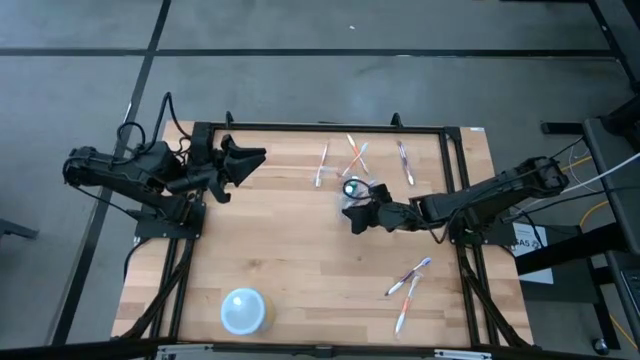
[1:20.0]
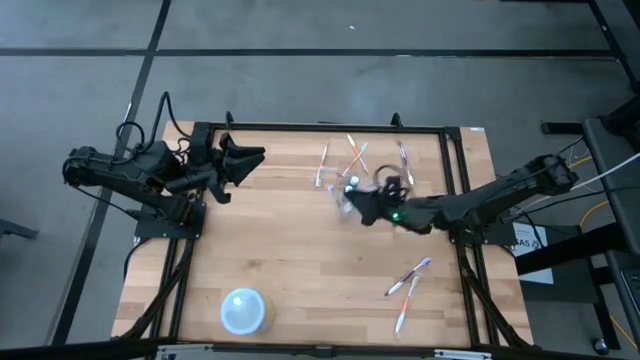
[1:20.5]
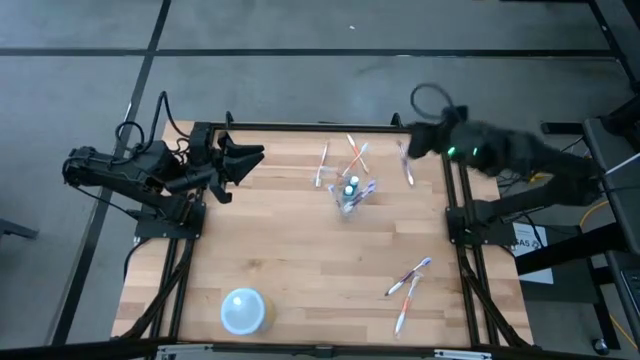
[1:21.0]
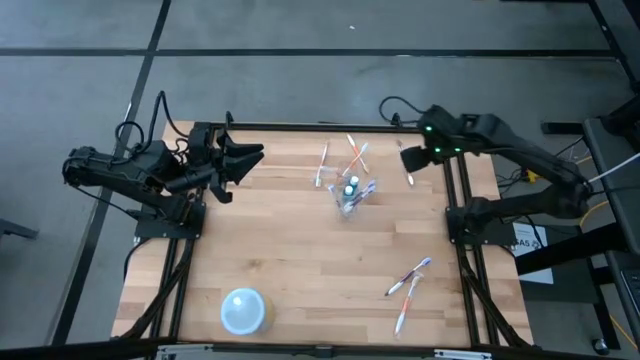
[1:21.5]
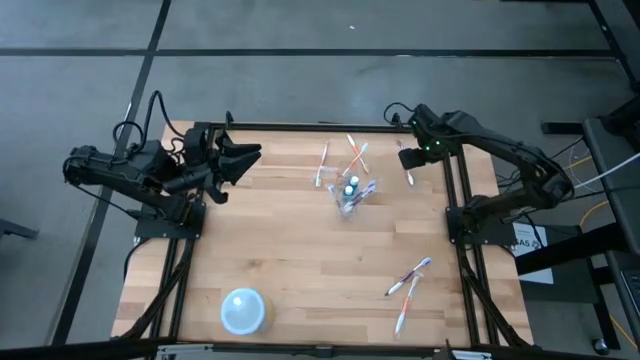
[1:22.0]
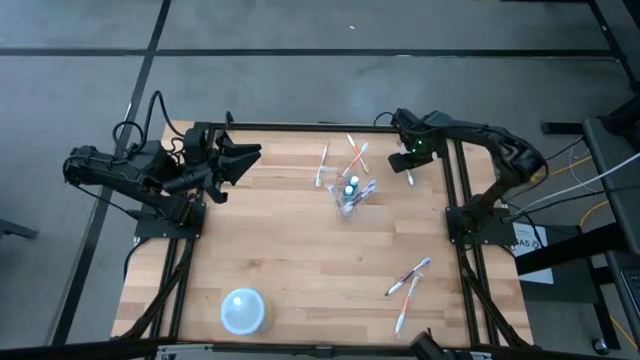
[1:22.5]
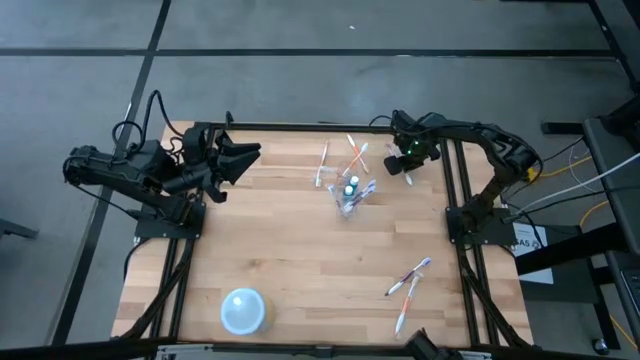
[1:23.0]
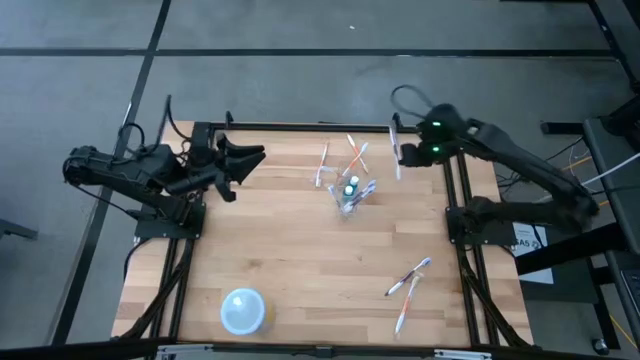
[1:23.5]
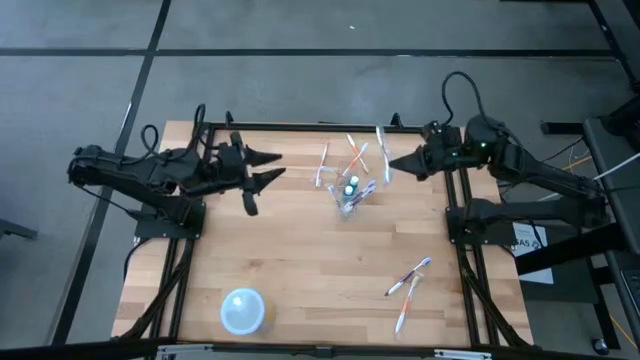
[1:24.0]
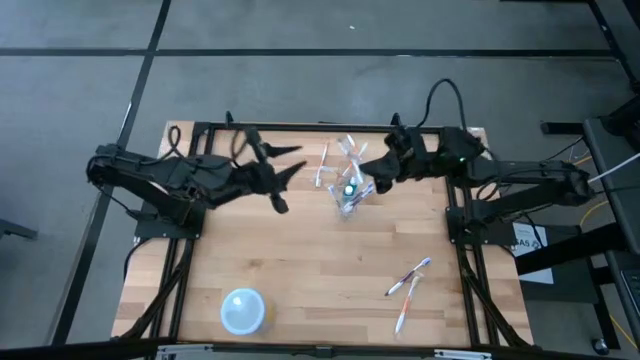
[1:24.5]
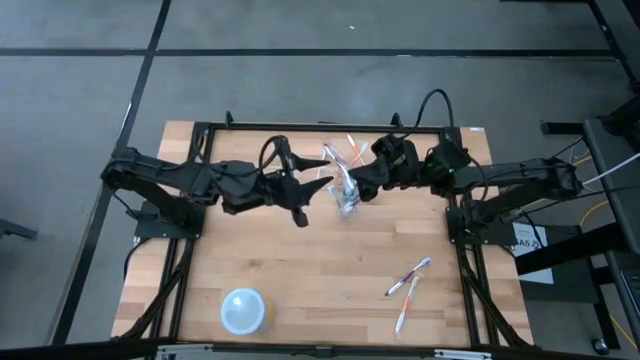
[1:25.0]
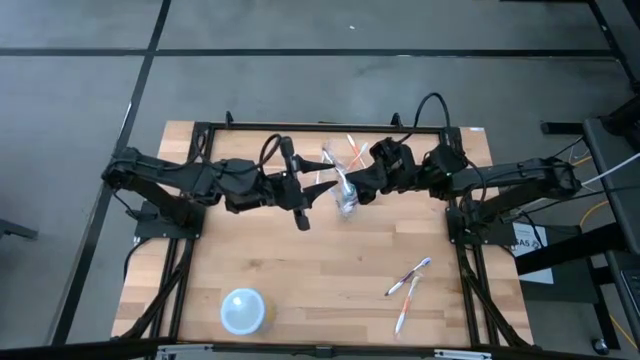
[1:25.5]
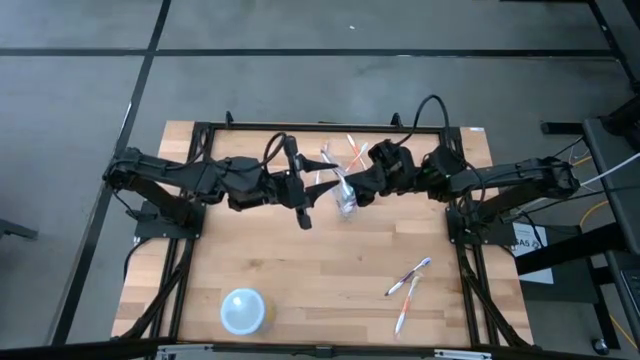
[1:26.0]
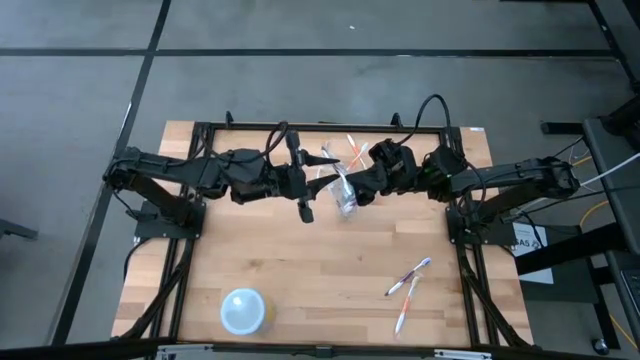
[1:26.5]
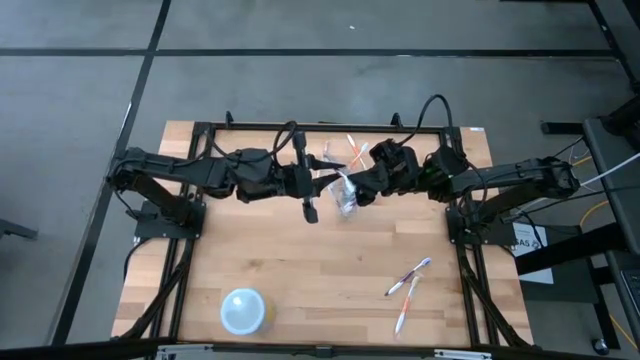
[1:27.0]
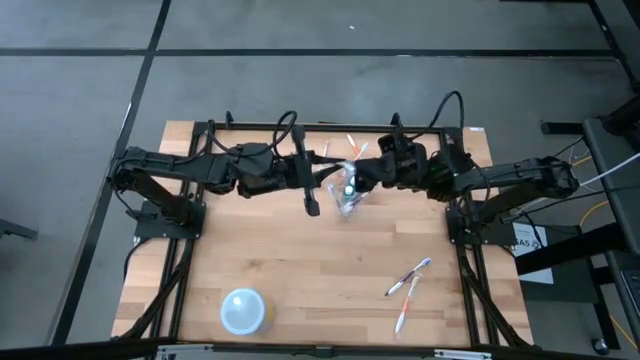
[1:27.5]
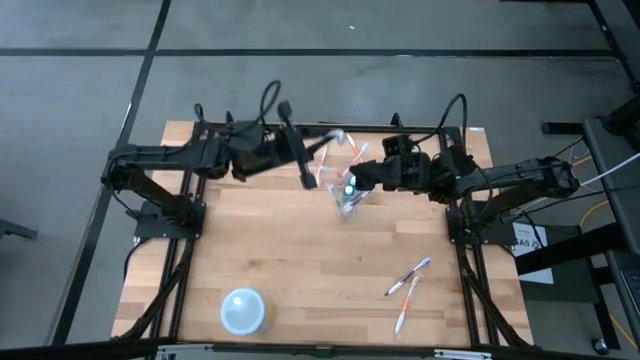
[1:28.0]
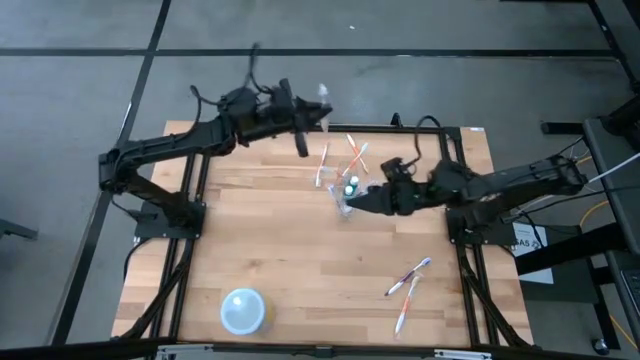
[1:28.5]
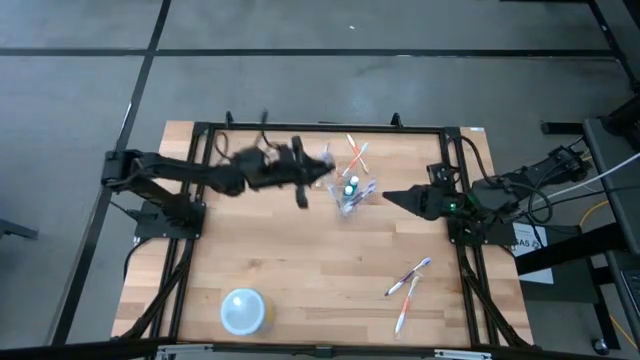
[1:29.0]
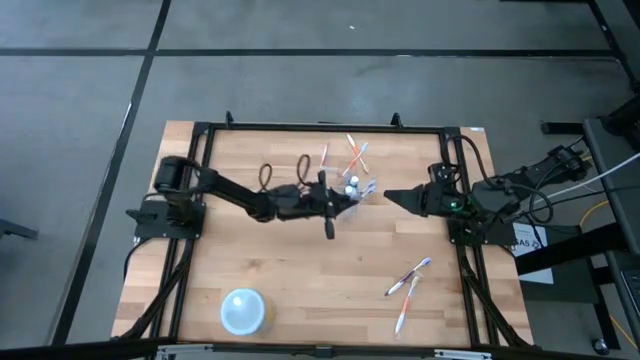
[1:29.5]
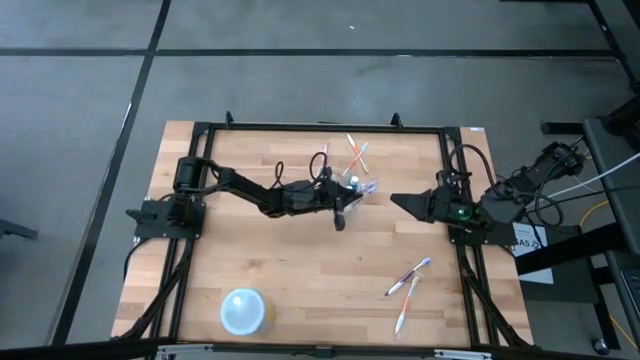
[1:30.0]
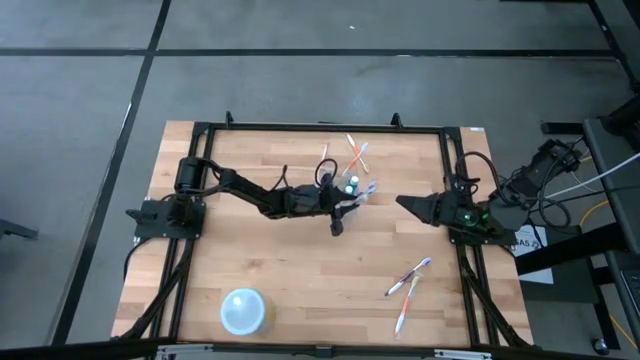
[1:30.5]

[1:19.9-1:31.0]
Task: Pick & Place toothbrushing station
Put the purple toothbrush into the transparent organizer

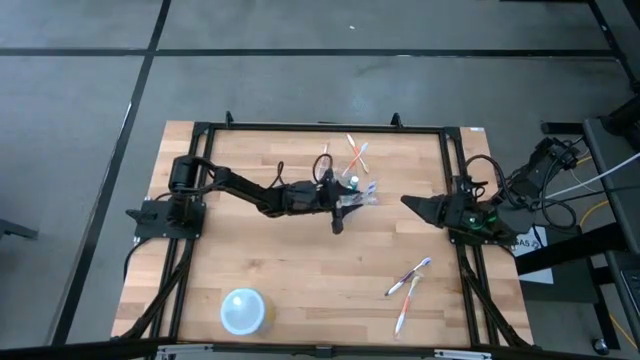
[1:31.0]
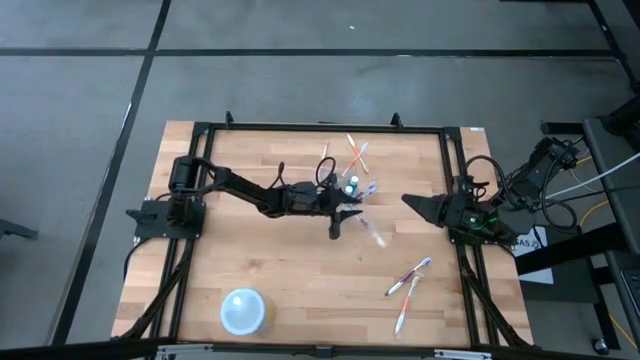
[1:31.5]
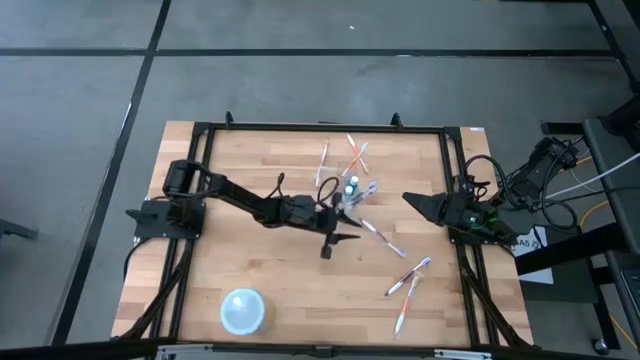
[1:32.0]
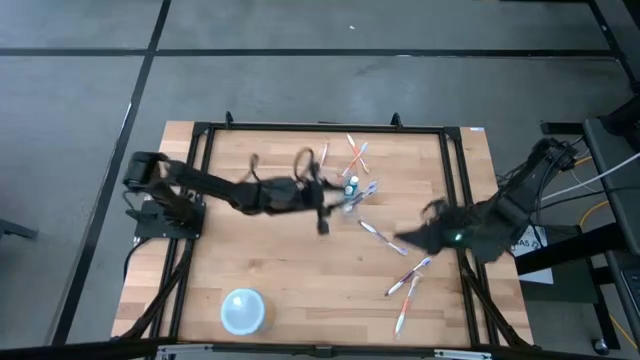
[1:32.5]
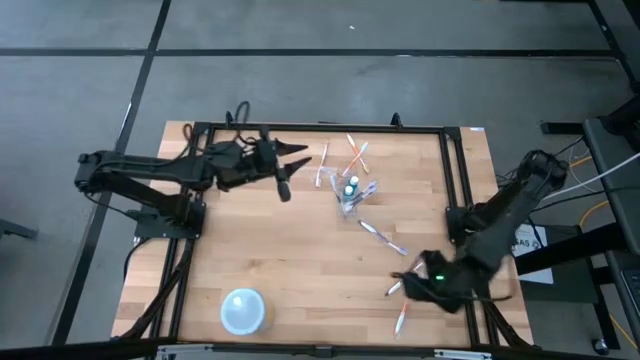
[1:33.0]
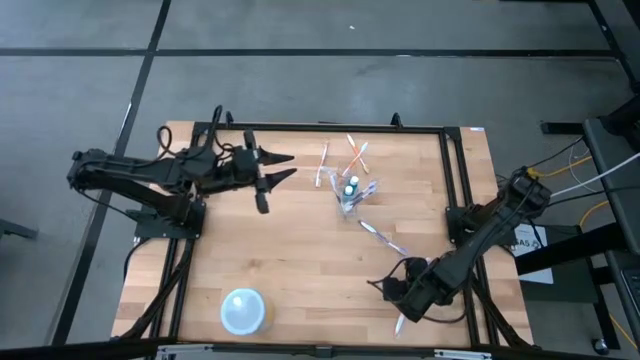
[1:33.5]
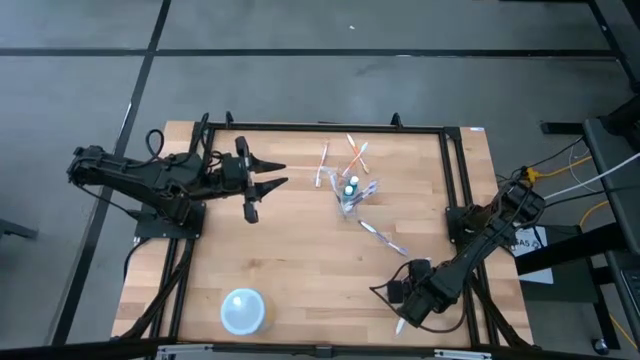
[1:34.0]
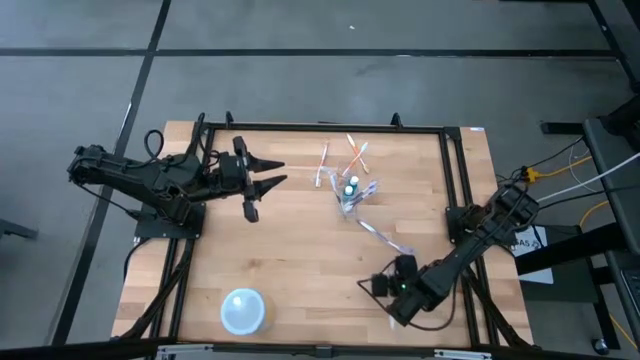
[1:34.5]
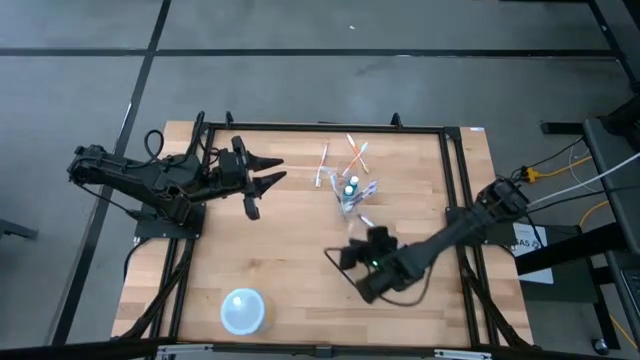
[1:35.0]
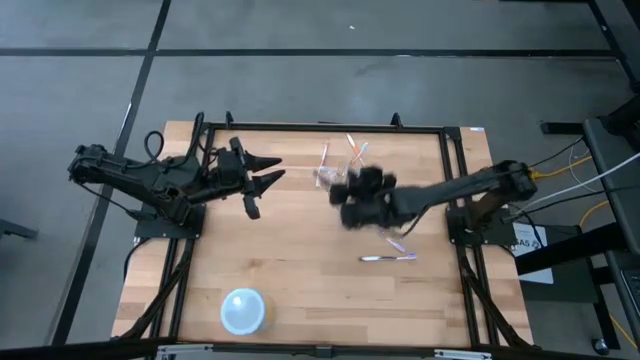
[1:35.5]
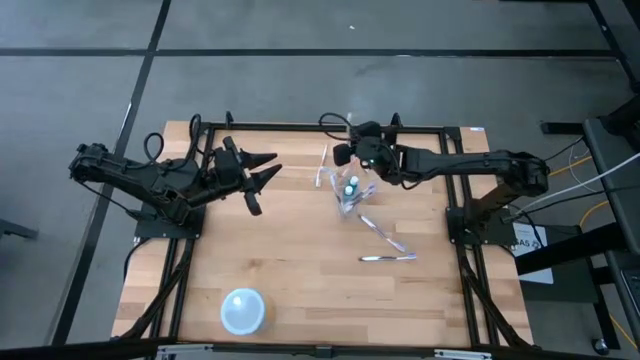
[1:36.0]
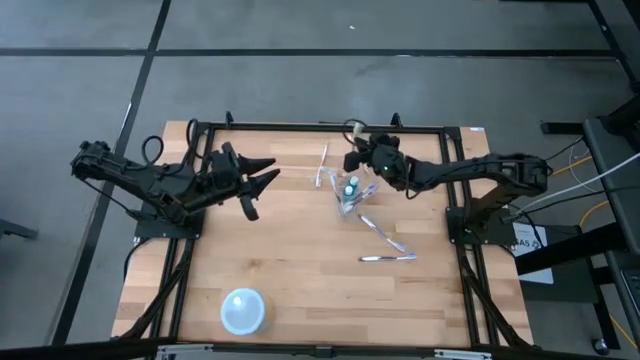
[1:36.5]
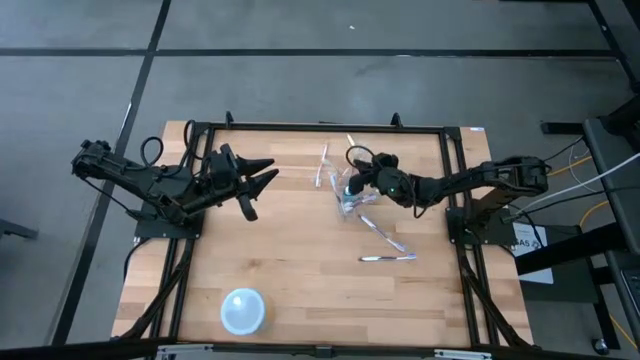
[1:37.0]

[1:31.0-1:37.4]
Put the orange toothbrush into the transparent organizer

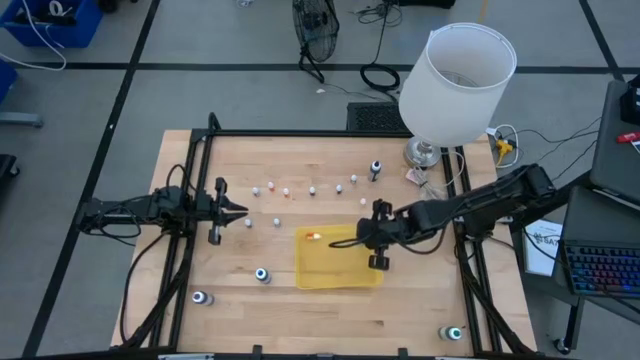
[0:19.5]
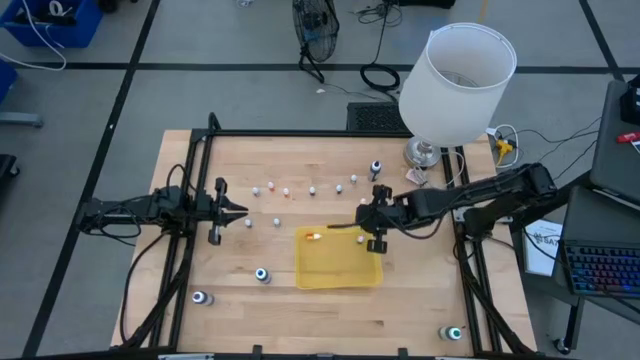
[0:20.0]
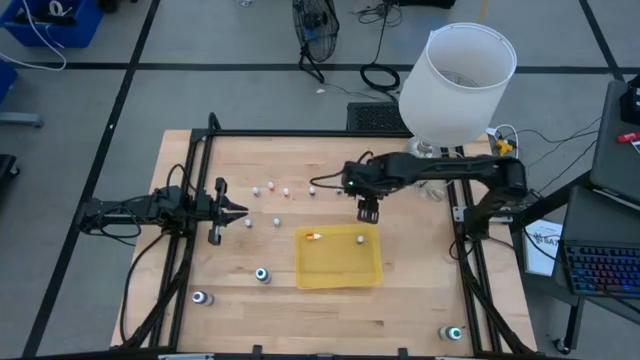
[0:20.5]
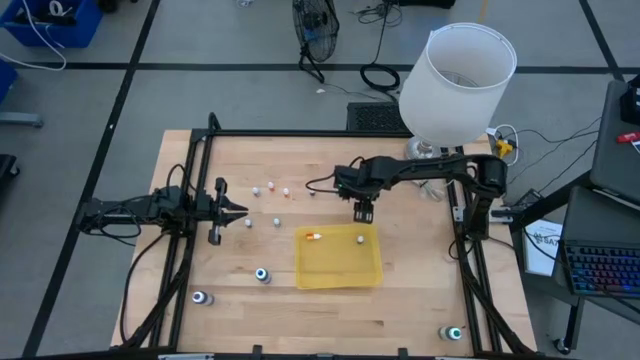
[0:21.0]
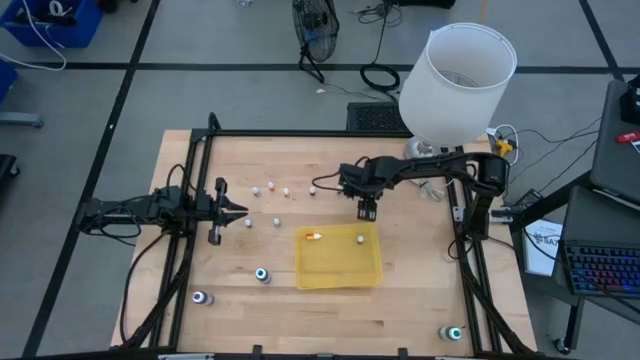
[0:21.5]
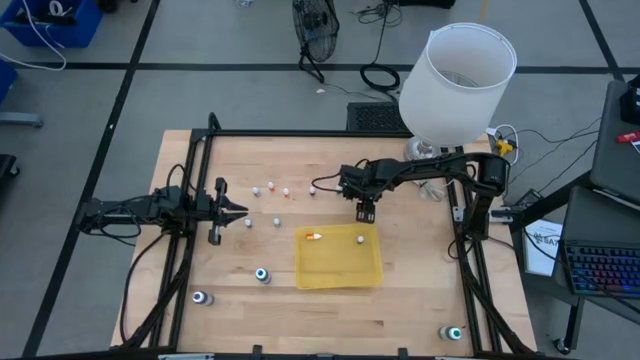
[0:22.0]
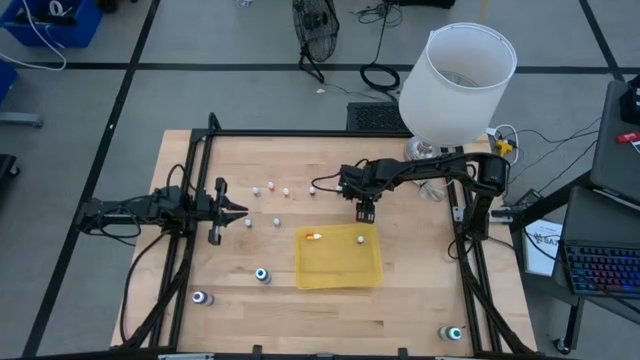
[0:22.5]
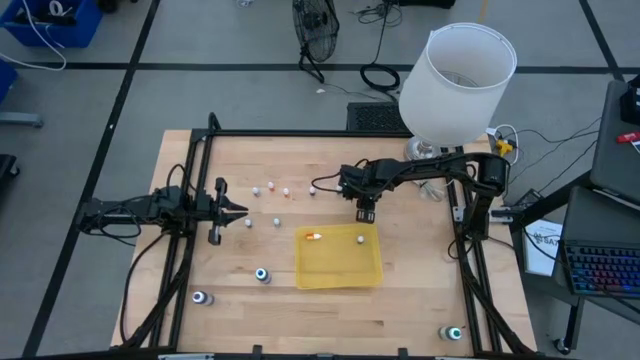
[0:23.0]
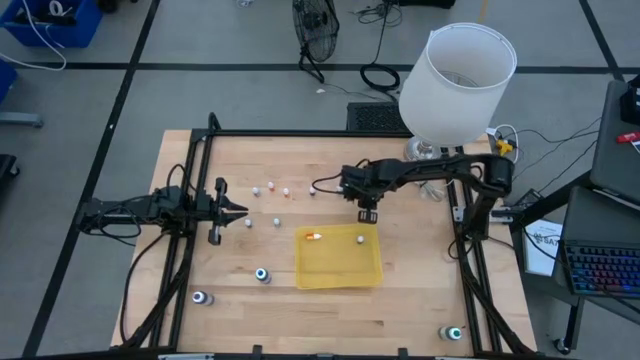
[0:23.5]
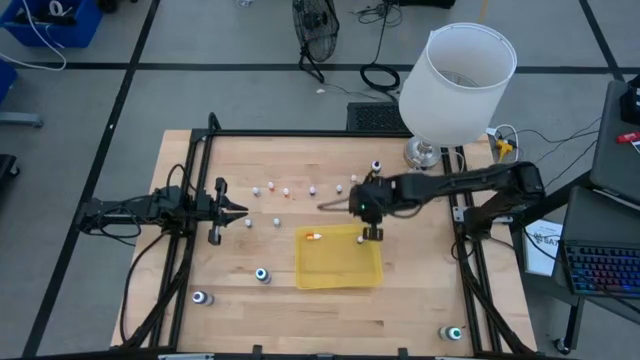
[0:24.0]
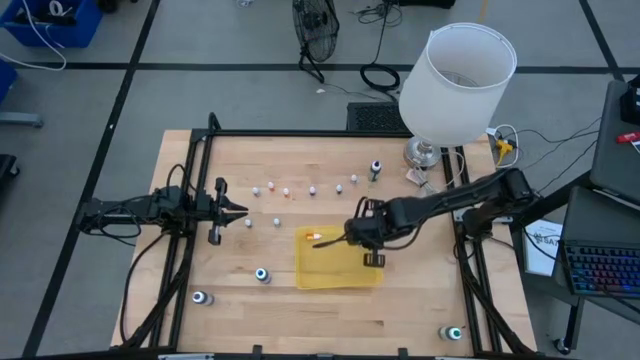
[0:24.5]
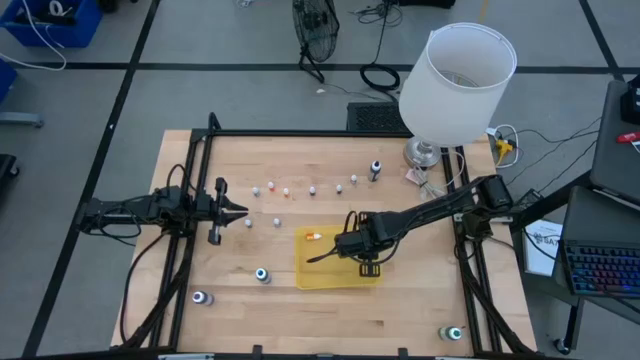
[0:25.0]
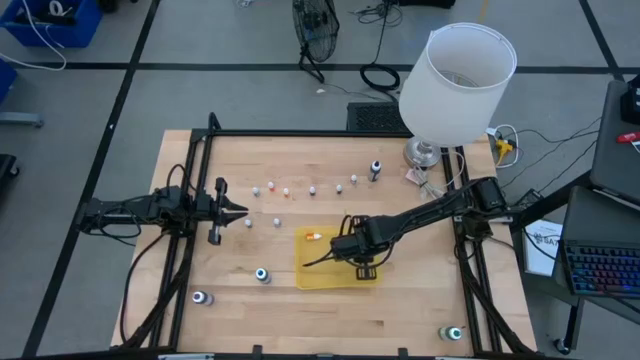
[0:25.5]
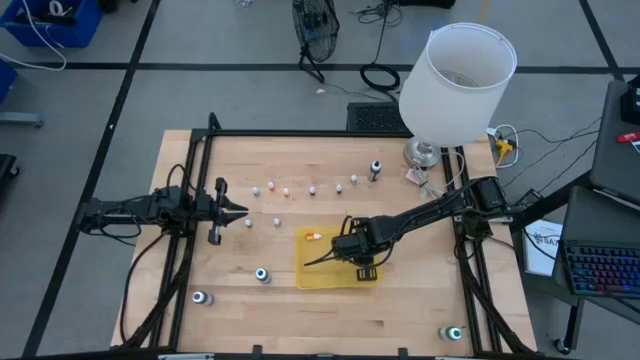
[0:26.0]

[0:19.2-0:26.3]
Task: Pick & Place food coloring
Put the right small orange food coloring bottle into the yellow bin
